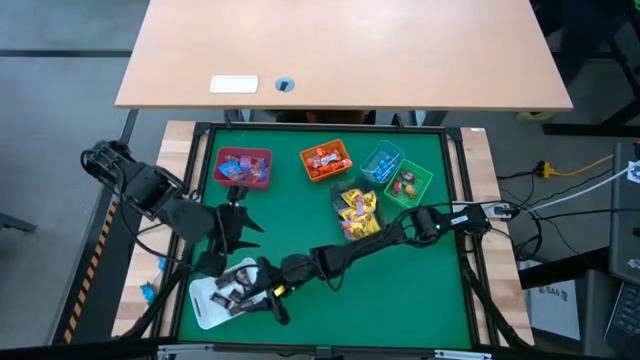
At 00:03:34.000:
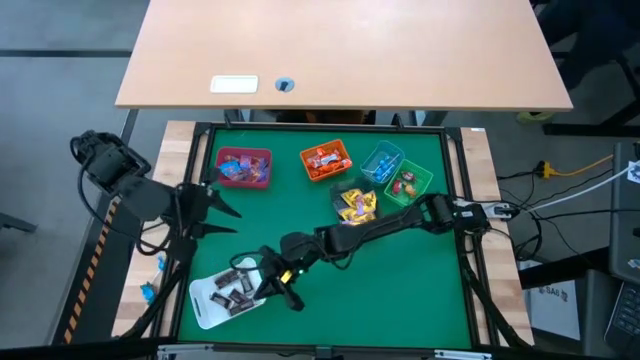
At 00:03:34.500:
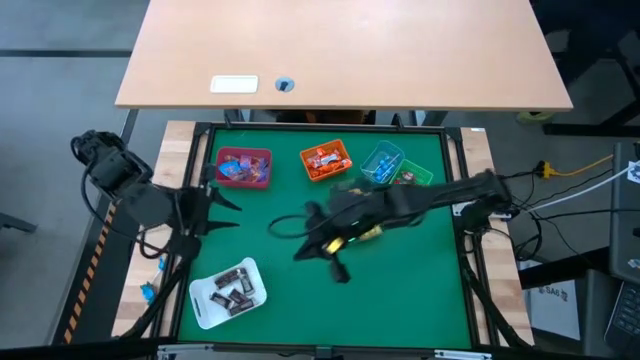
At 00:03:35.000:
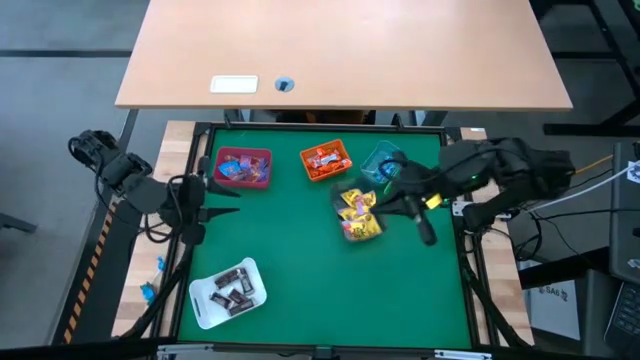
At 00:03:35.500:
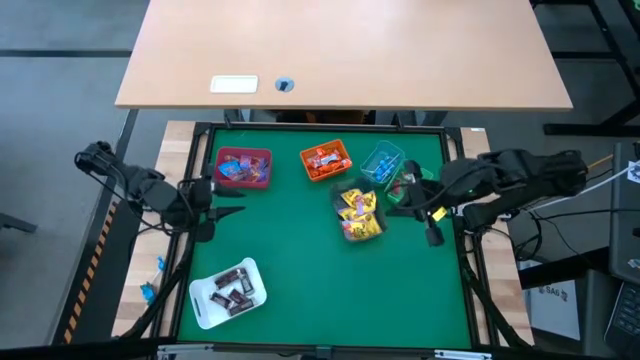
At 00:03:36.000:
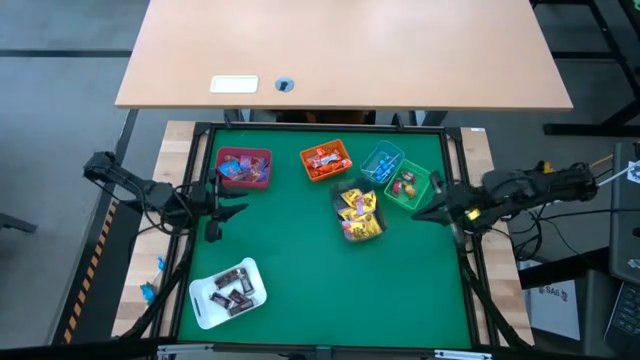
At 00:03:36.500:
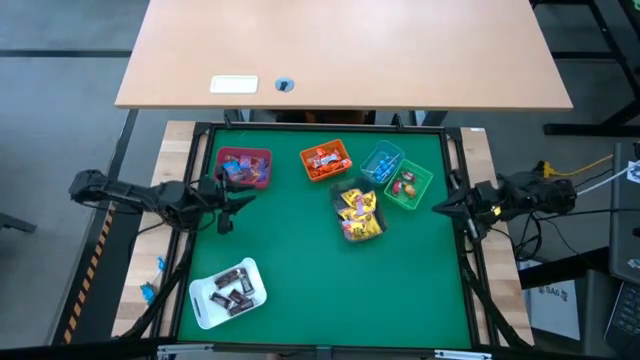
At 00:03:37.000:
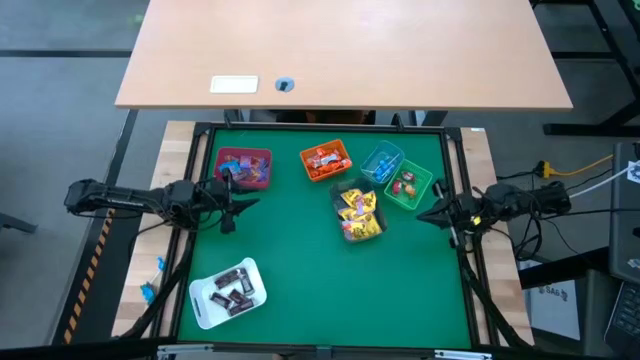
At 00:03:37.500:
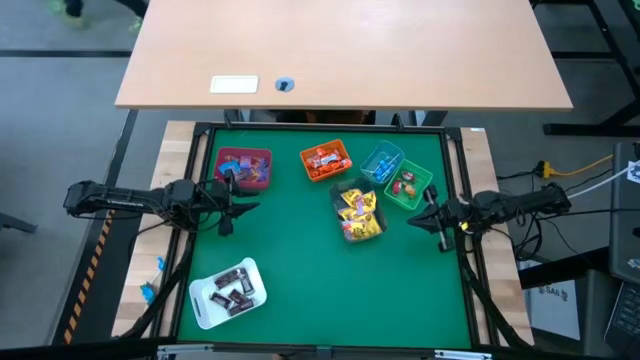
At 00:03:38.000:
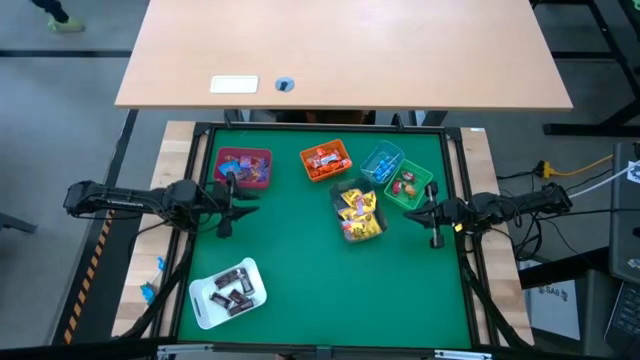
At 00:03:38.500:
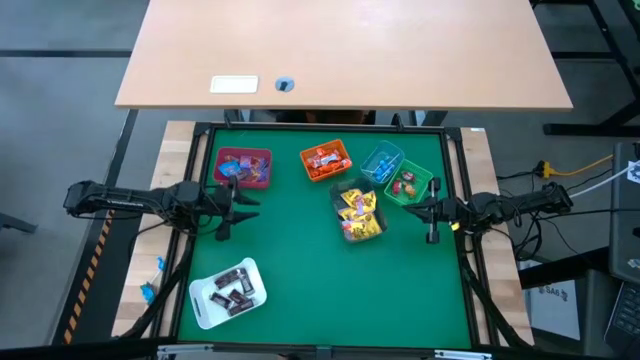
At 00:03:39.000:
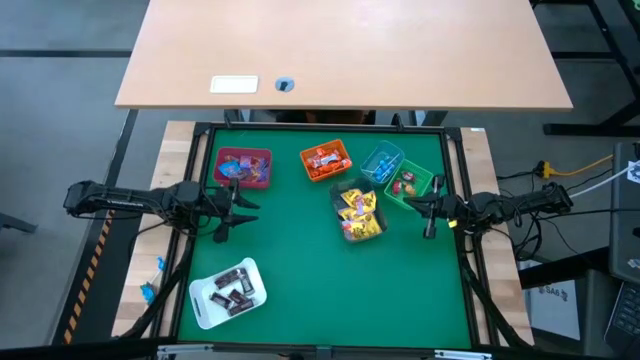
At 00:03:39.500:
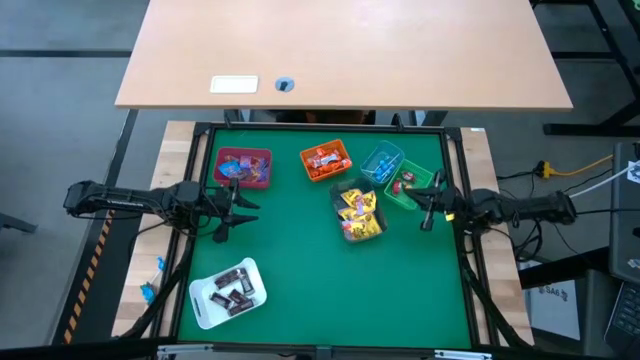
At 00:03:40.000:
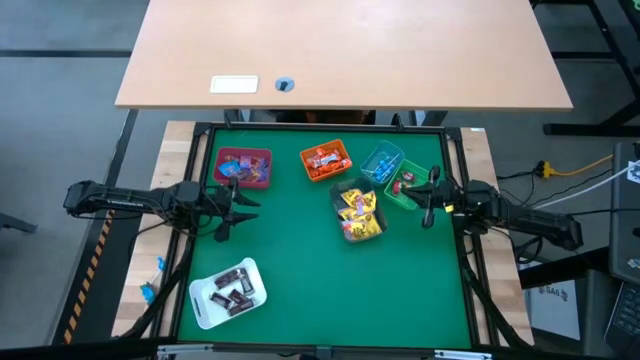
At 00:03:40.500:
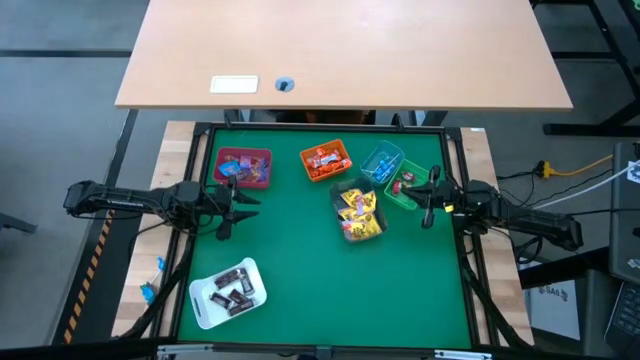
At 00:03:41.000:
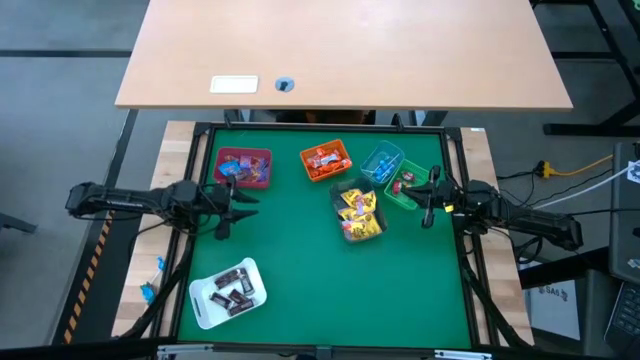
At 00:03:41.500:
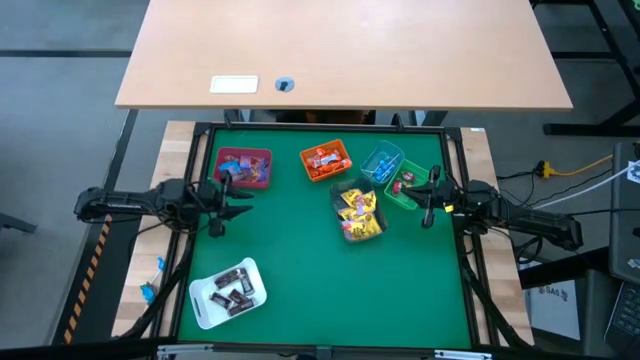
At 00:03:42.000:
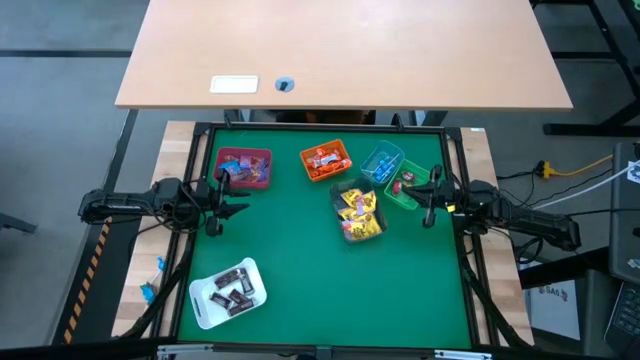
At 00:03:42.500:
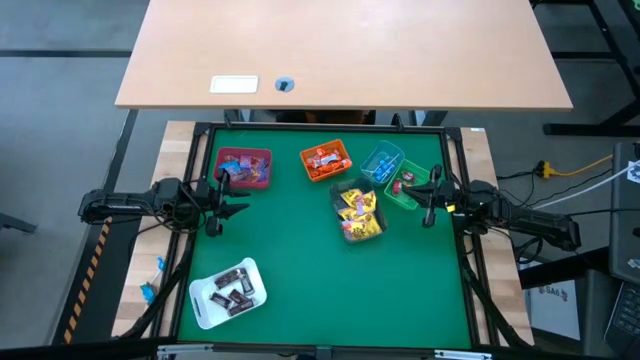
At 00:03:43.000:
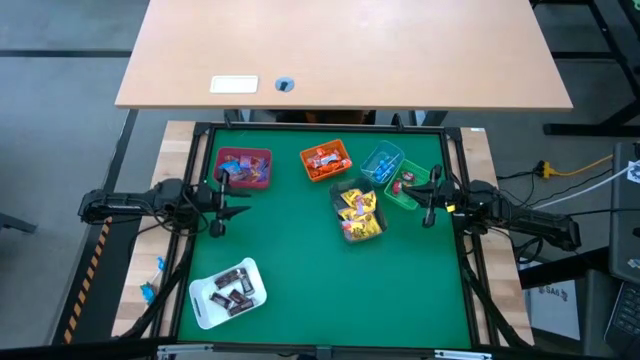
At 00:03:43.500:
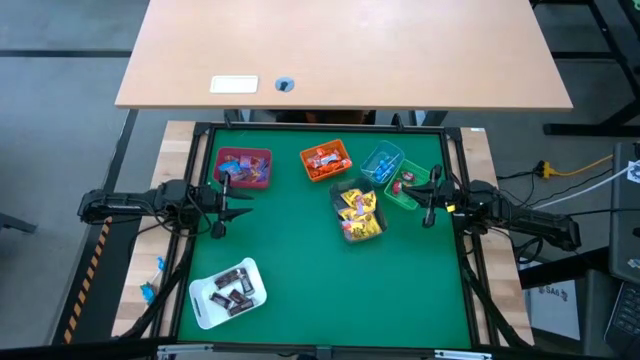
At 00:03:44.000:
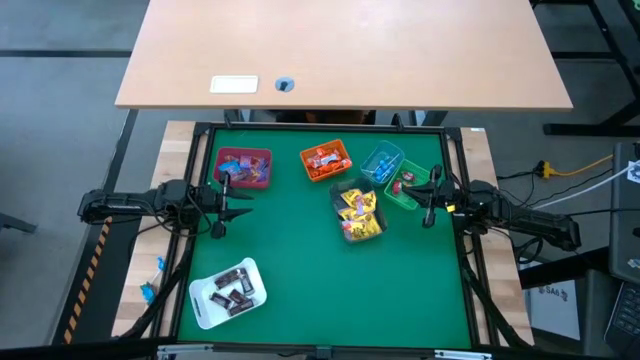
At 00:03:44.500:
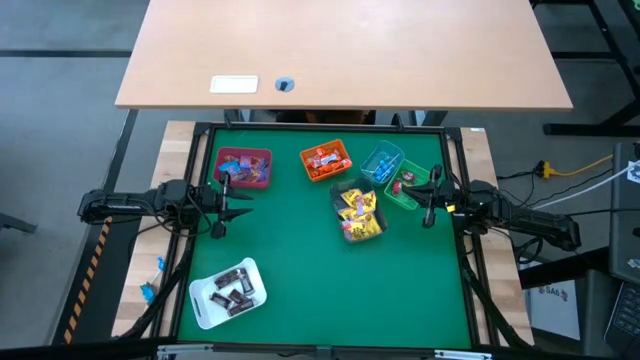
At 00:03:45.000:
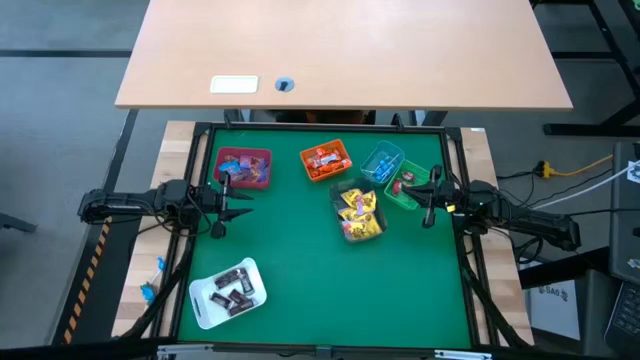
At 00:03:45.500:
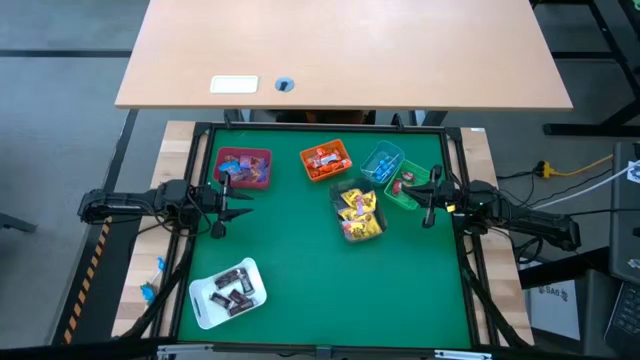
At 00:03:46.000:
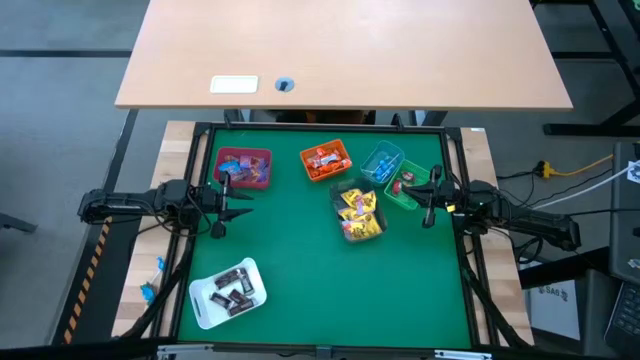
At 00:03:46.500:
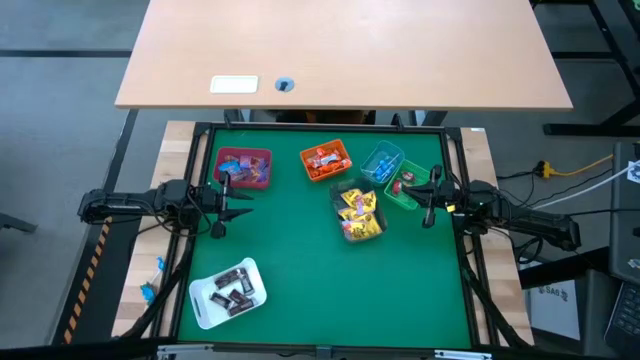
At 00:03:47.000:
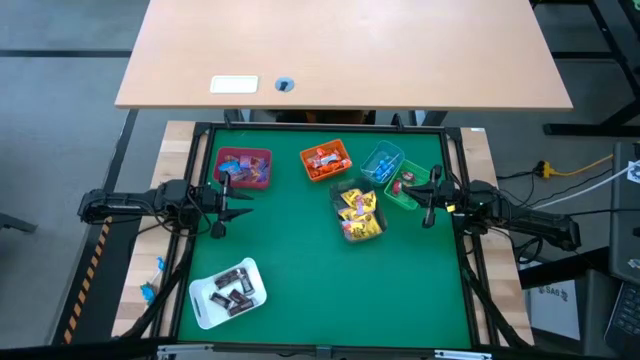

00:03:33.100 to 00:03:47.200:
Task: Sort candy
Return to Home Position

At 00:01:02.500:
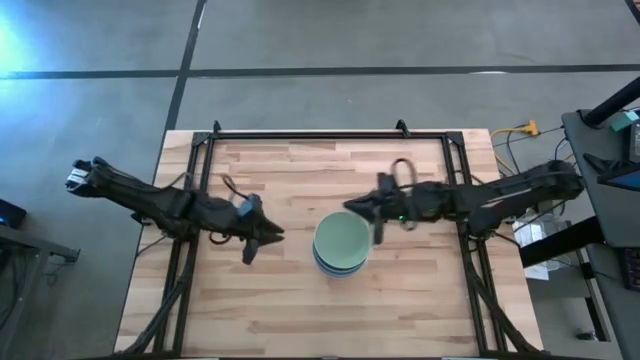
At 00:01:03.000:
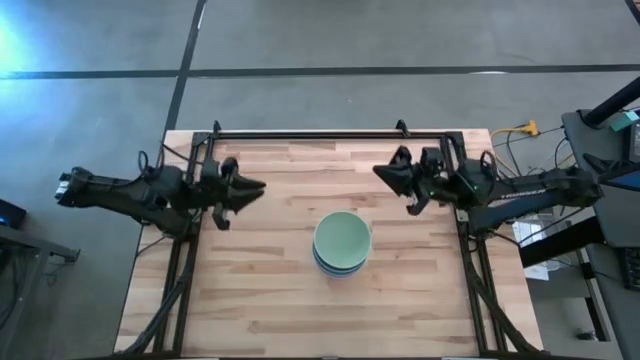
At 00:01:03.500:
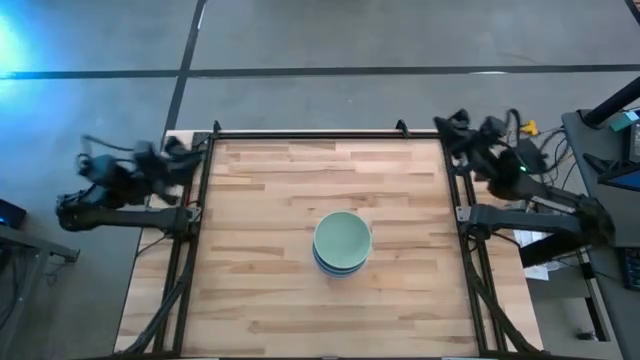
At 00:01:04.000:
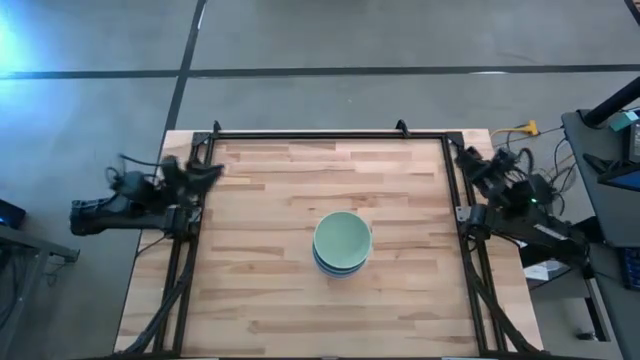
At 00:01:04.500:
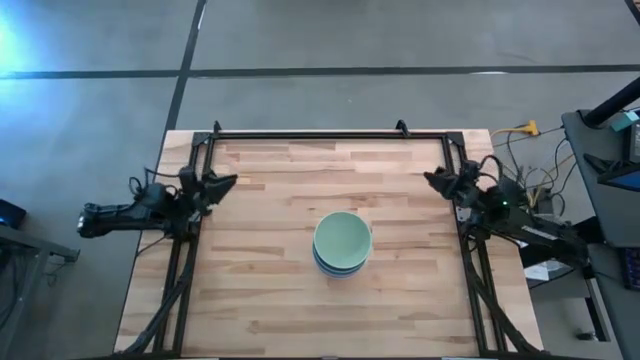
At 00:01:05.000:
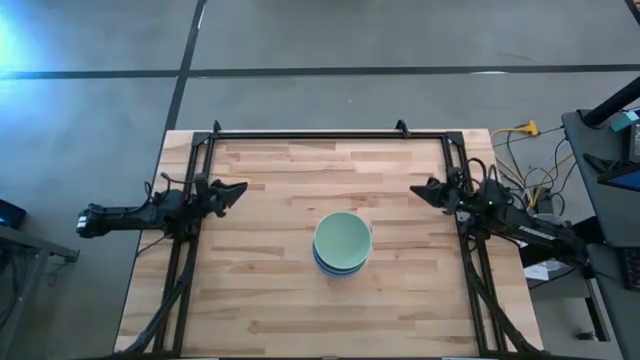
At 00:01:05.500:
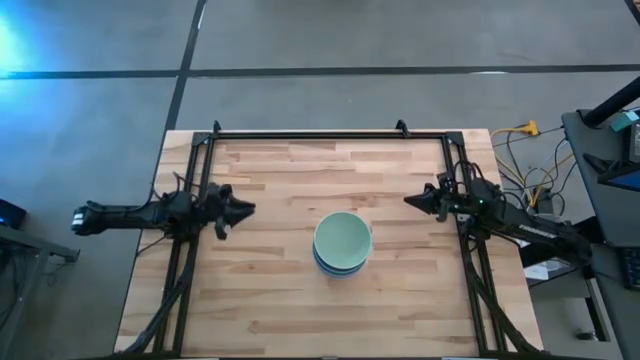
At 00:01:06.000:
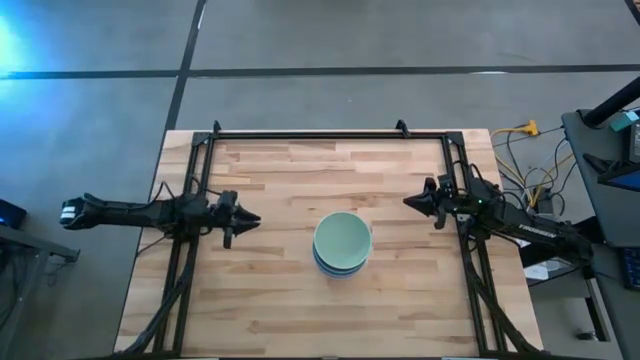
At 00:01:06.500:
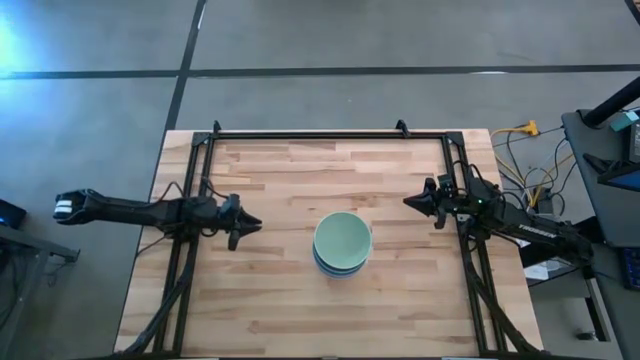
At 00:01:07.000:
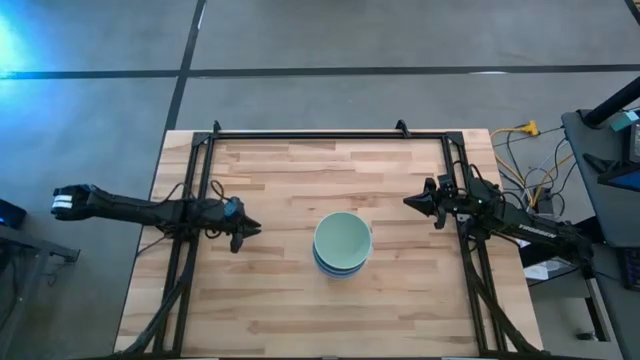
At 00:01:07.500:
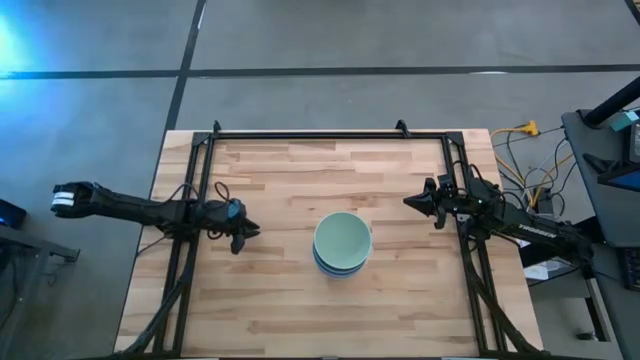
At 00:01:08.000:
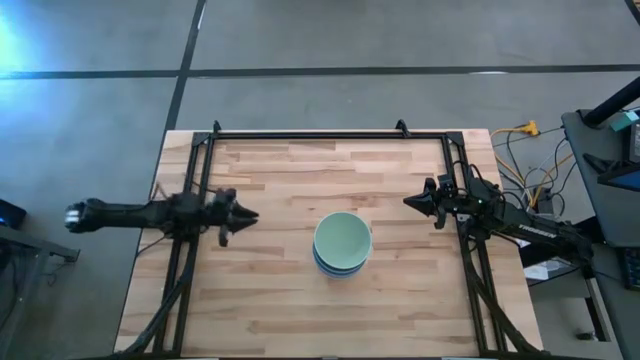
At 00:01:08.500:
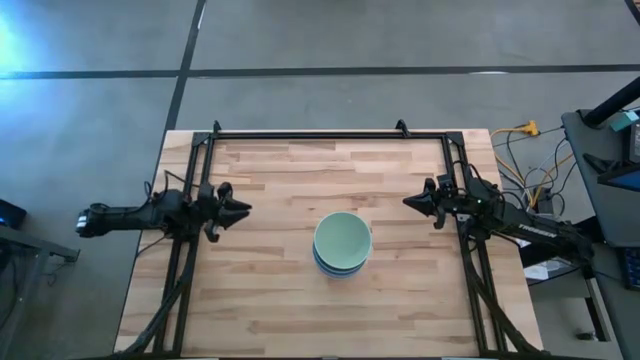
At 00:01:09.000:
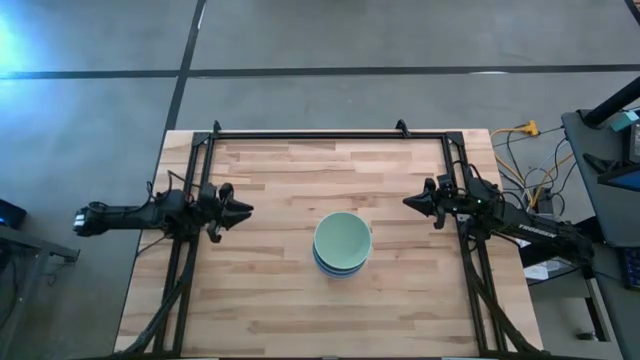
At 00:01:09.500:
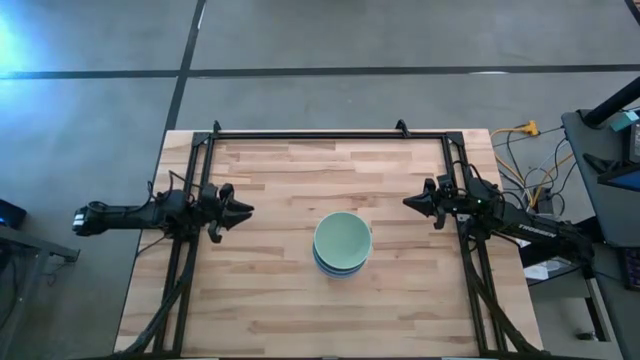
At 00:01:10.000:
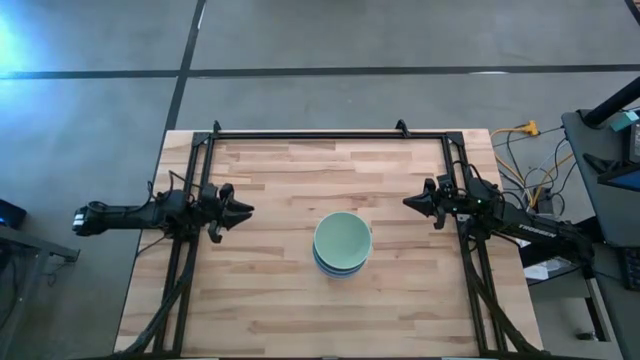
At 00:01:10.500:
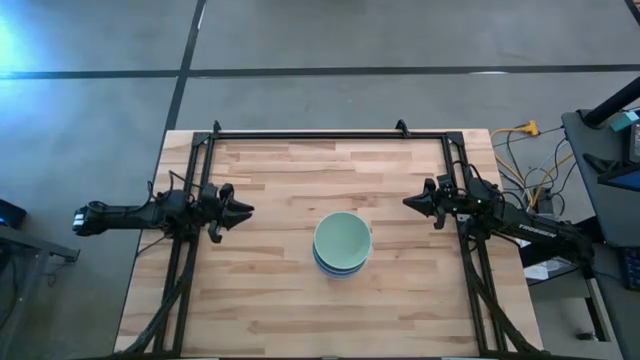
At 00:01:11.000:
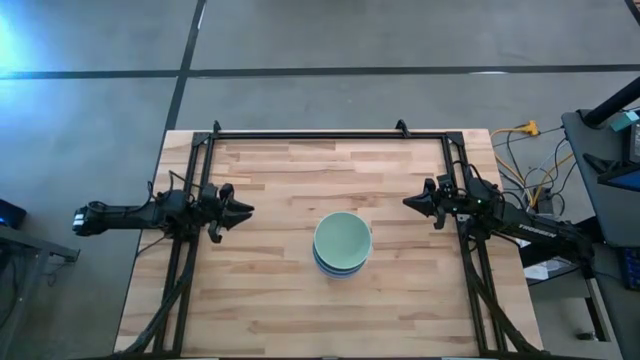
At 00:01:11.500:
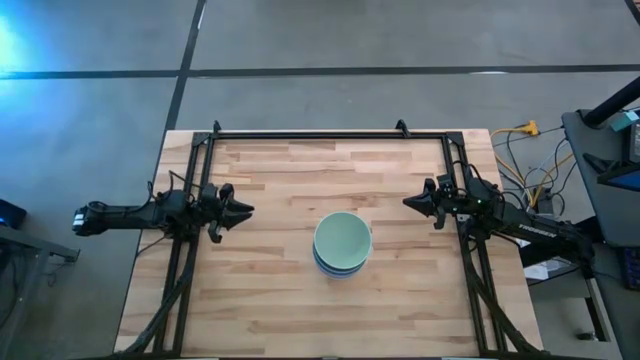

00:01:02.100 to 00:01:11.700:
Task: Nest bowls inside each other
Return to Home Position
